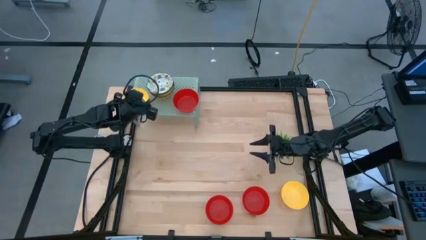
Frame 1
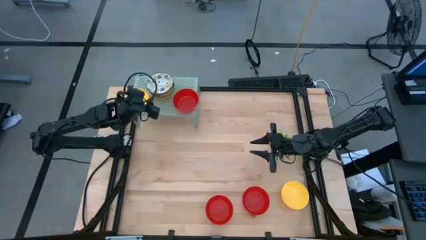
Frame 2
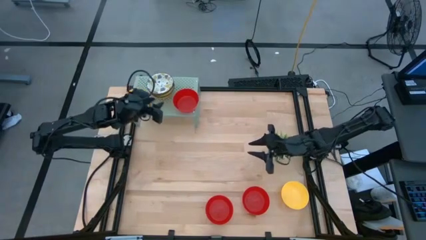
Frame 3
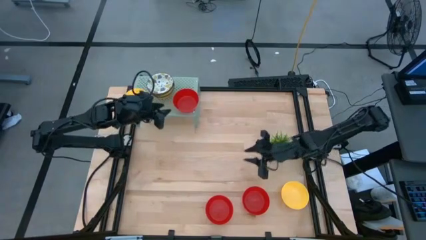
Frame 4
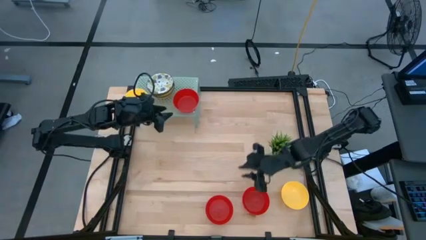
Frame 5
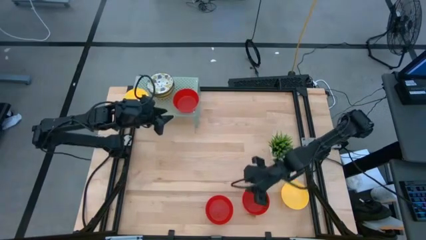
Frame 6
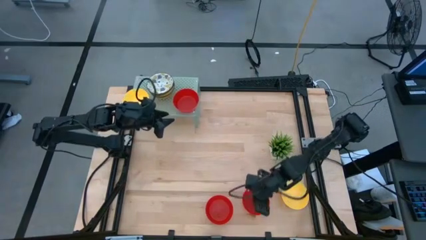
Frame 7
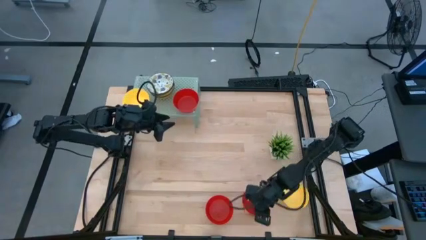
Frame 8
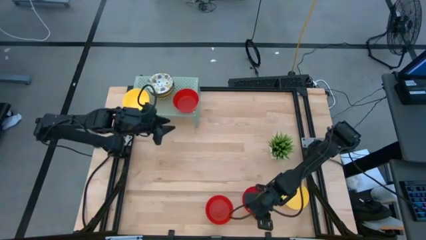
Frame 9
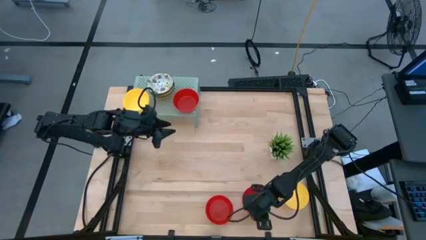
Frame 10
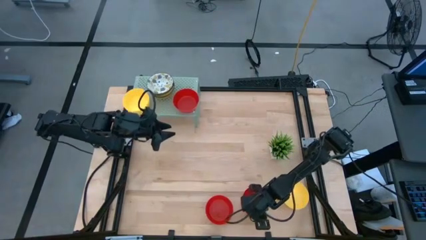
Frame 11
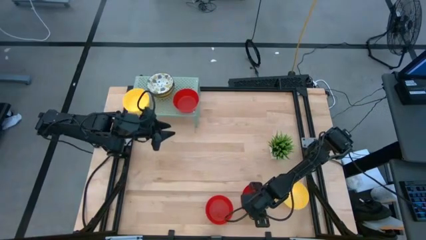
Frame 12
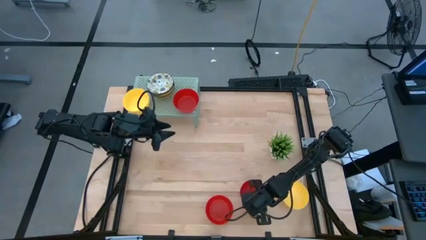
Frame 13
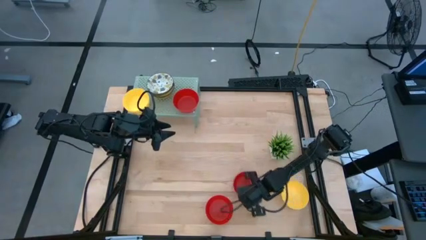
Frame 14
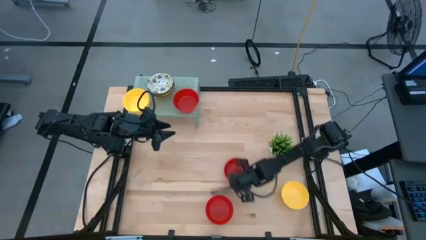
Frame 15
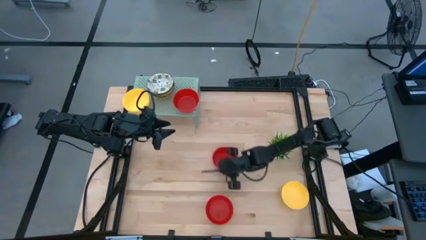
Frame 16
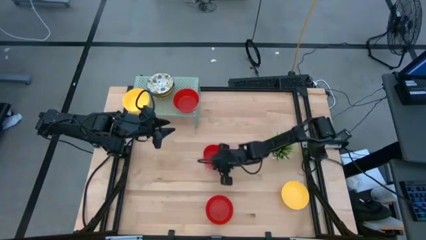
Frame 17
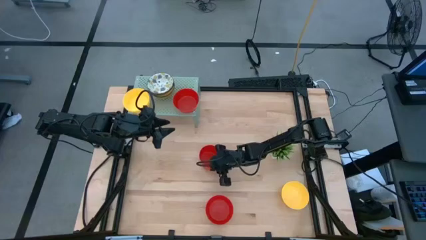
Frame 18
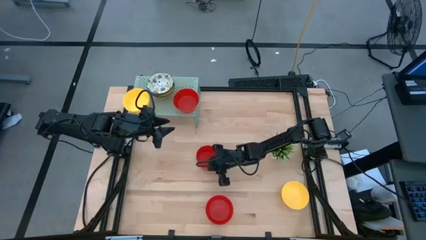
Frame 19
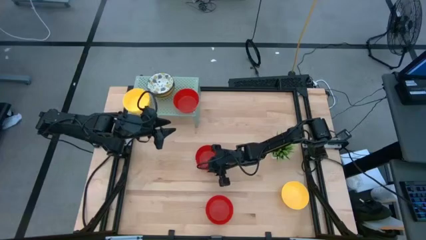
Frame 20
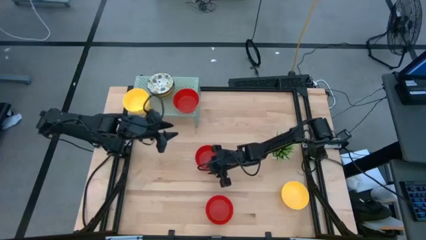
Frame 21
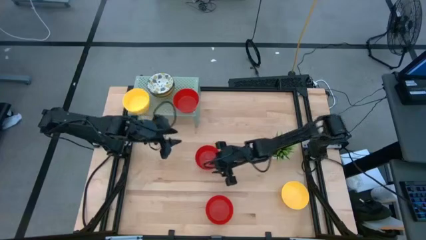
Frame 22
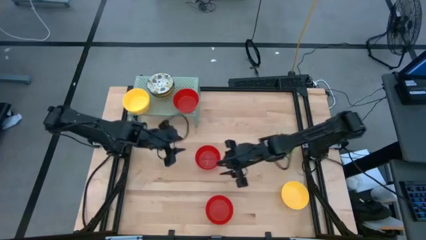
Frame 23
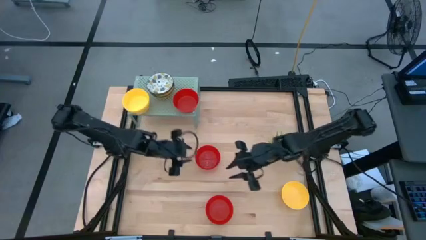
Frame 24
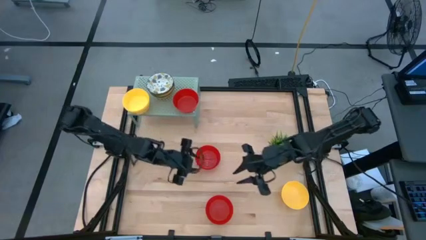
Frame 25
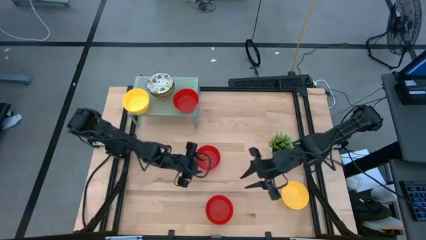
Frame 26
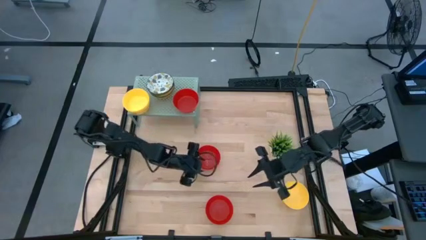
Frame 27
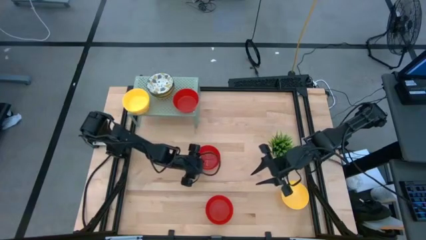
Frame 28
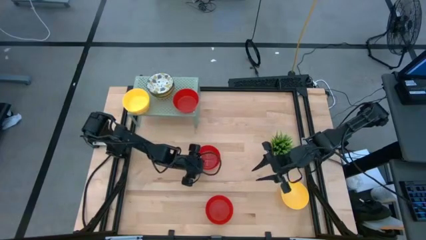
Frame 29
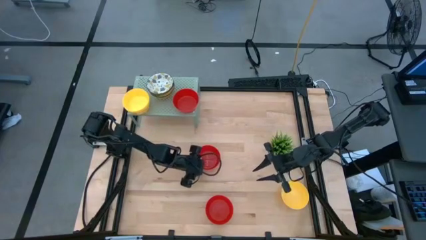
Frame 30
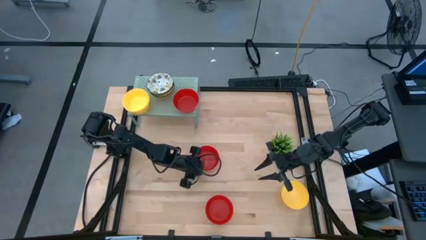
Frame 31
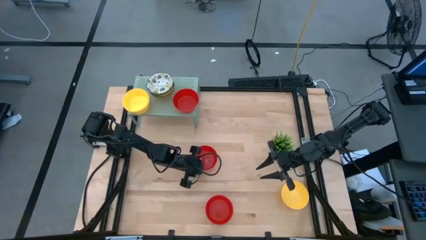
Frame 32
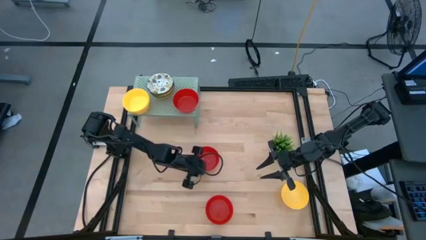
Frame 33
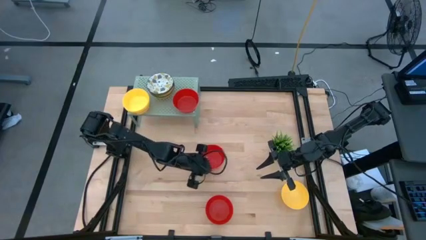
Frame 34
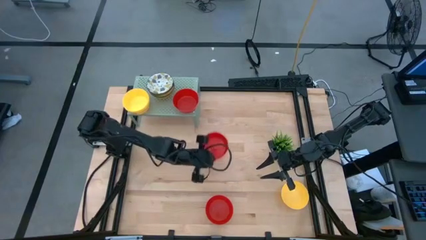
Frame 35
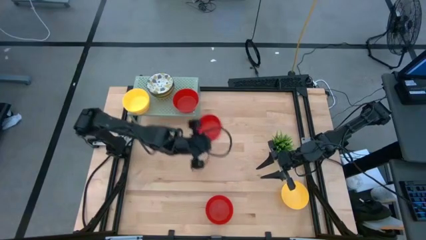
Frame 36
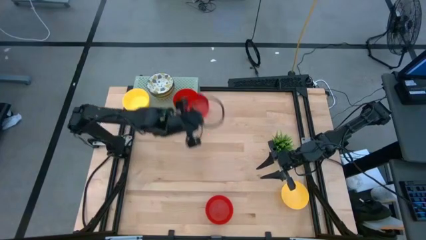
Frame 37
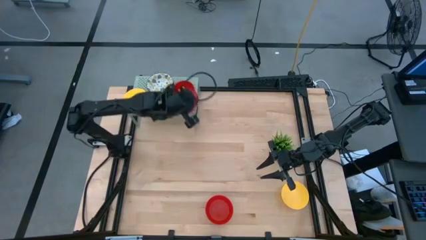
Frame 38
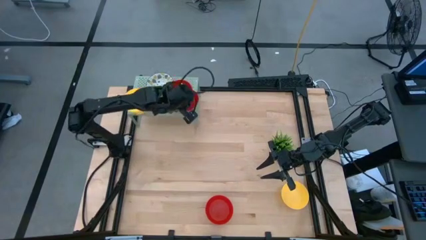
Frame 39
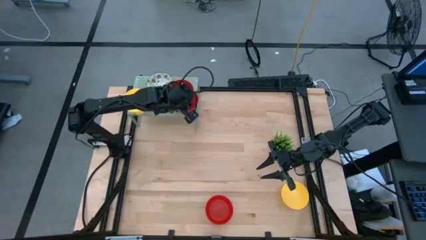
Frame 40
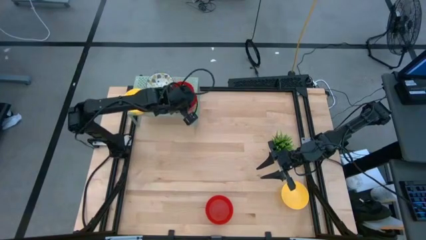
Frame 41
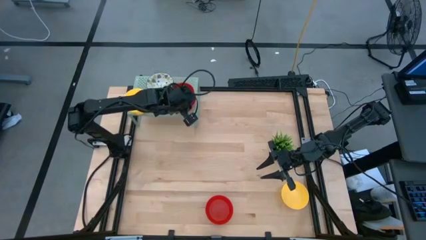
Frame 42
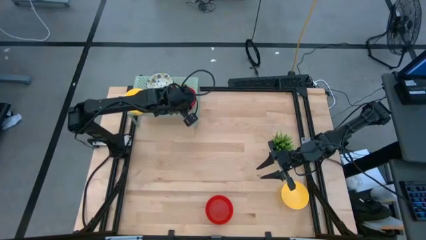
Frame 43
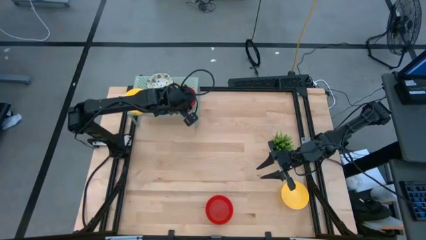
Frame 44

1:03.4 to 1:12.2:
Task: Pick & Place Mini bowls
Stack the red bowl on the red bowl on the shelf

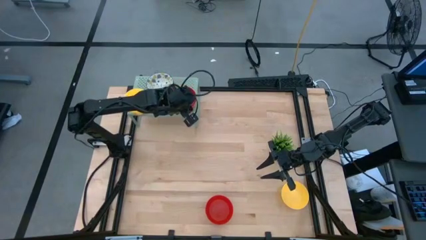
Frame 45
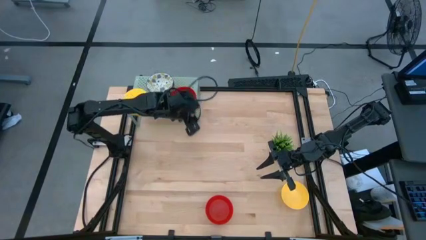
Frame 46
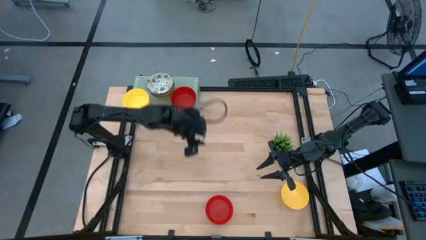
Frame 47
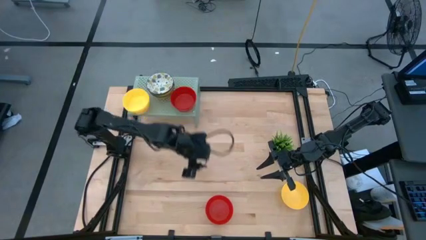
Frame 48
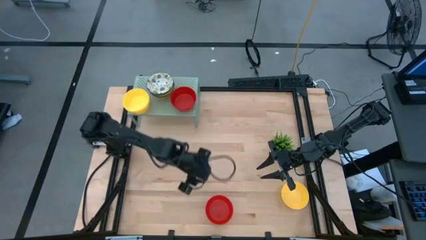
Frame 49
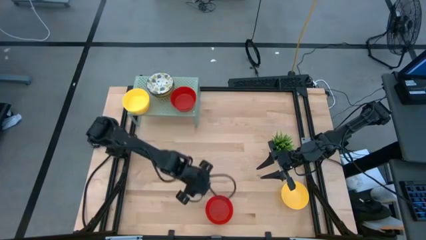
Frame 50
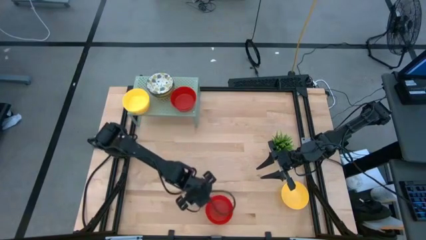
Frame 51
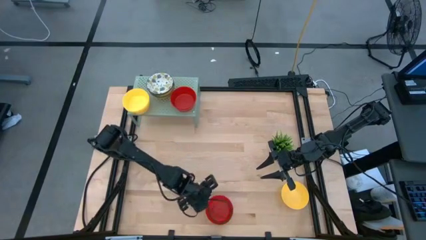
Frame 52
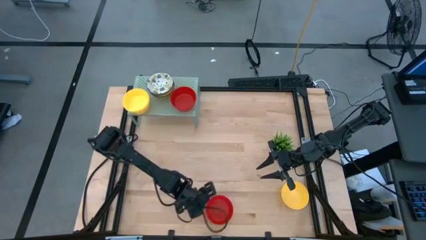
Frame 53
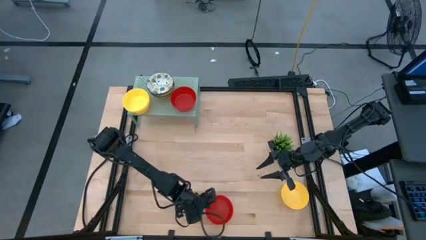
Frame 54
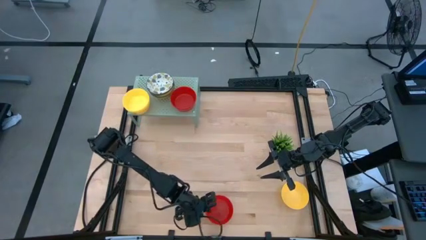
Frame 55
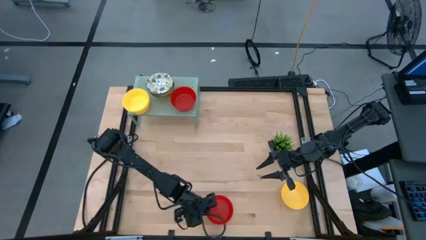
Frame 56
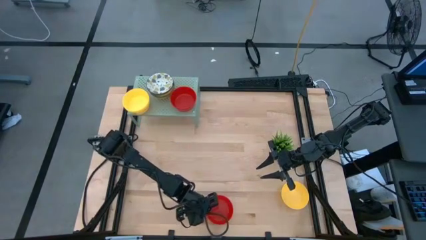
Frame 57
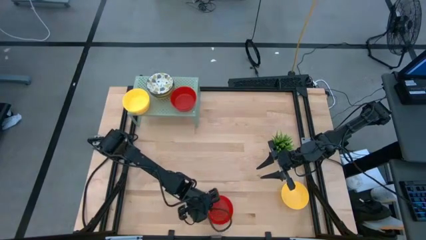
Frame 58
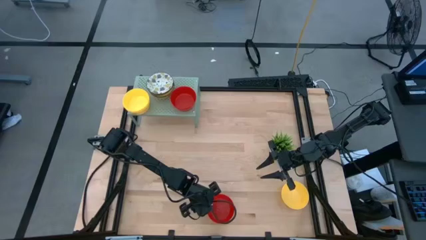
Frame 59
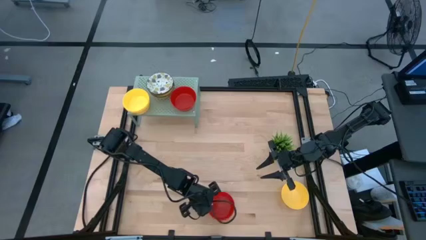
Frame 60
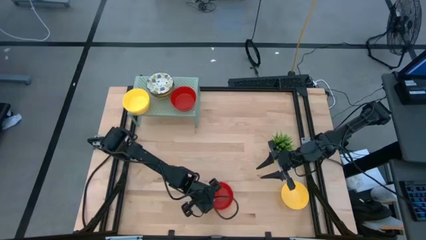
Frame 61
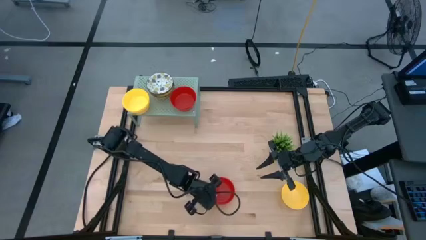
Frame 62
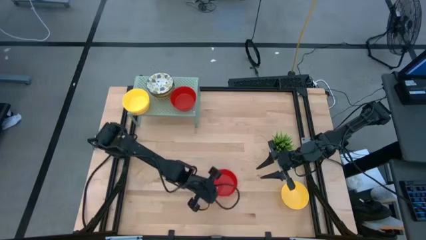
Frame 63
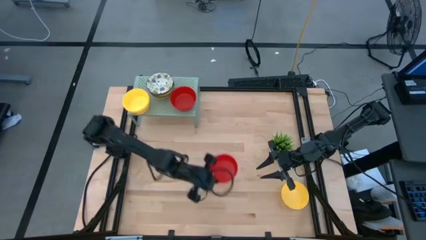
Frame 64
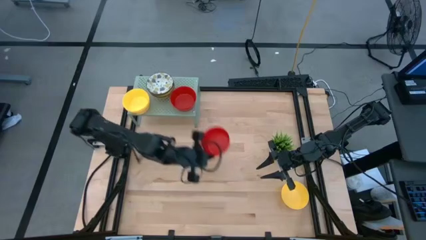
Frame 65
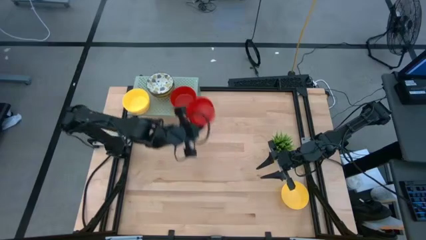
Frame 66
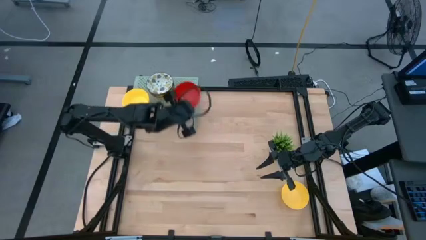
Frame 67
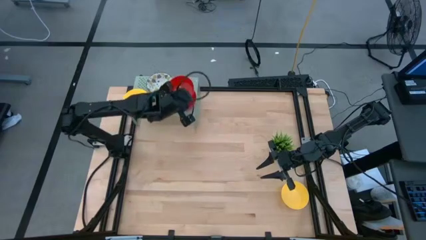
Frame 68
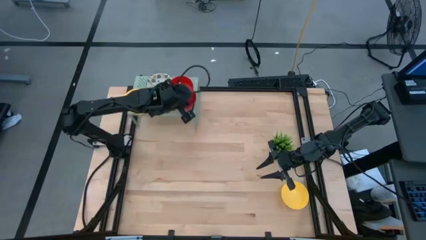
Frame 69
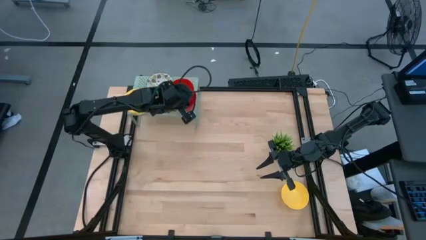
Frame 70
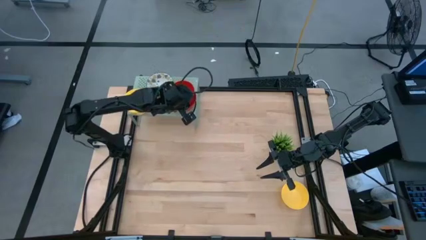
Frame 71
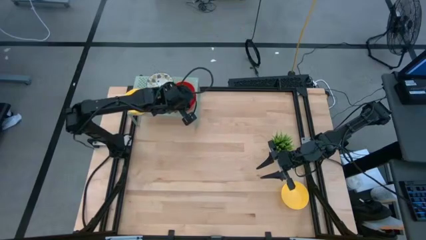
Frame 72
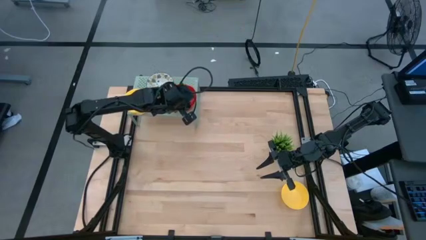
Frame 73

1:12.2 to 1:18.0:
Stack the red bowl on the red bowl on the shelf

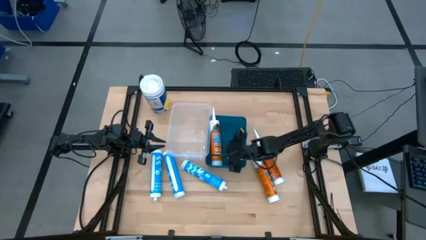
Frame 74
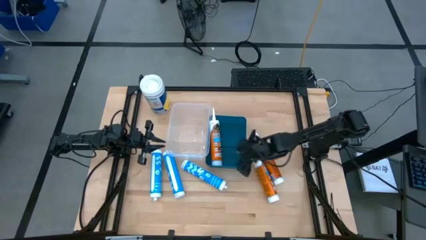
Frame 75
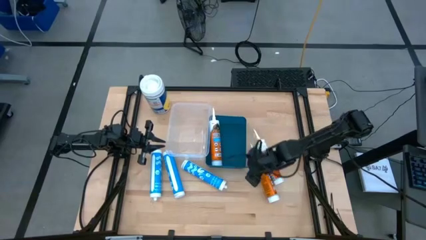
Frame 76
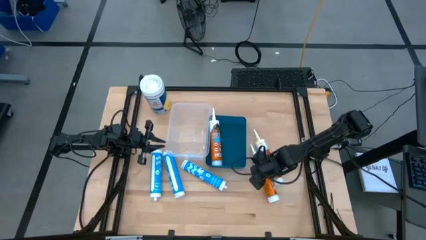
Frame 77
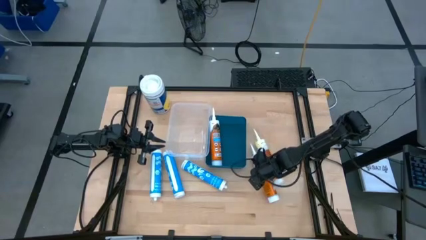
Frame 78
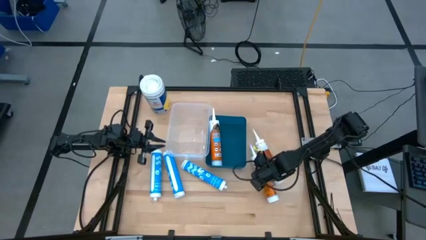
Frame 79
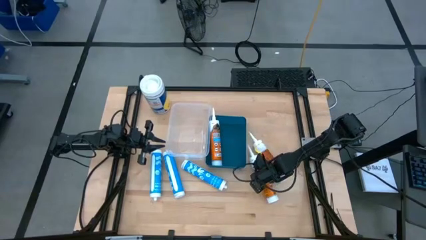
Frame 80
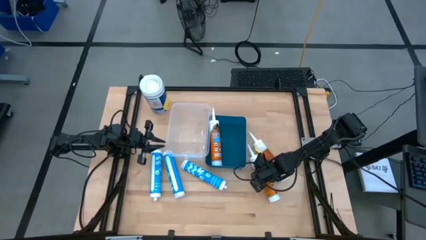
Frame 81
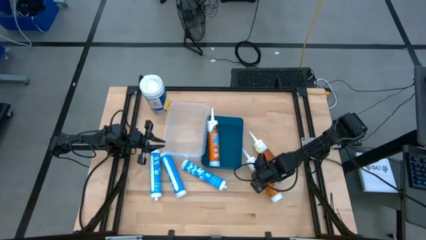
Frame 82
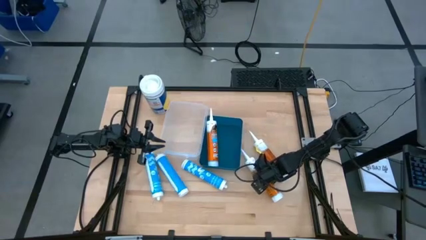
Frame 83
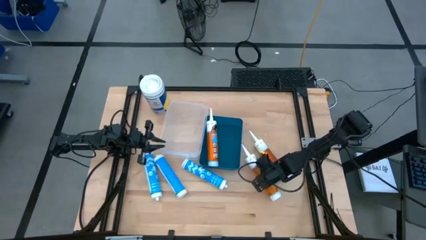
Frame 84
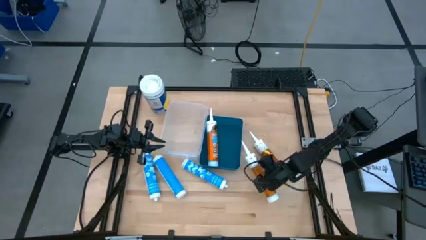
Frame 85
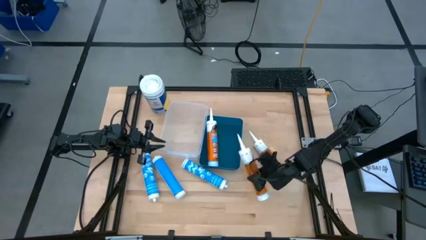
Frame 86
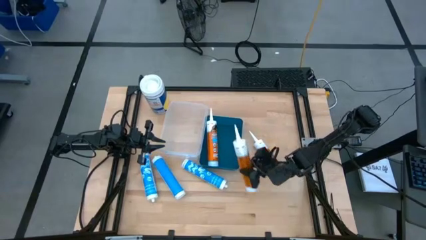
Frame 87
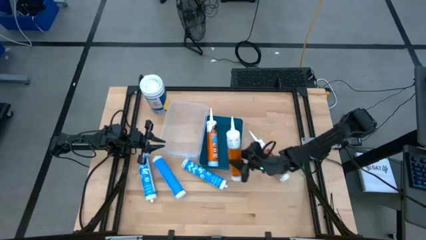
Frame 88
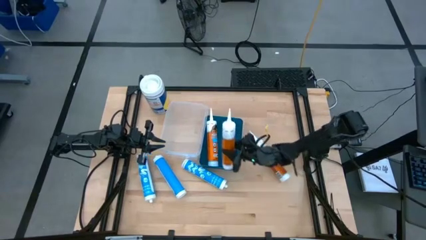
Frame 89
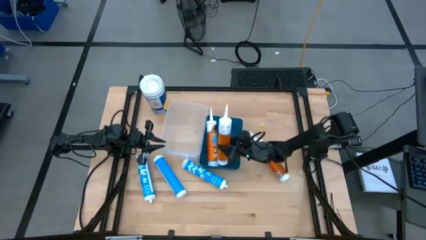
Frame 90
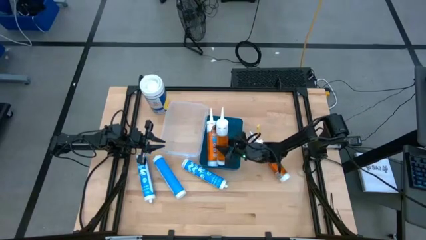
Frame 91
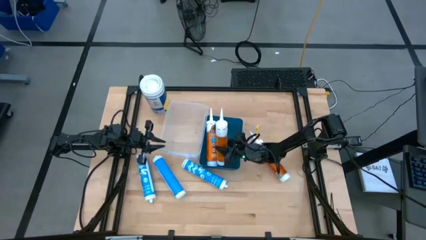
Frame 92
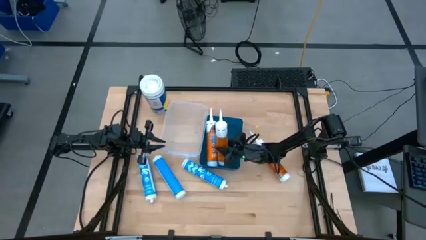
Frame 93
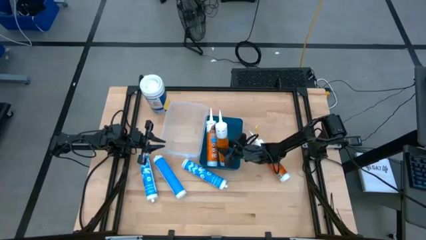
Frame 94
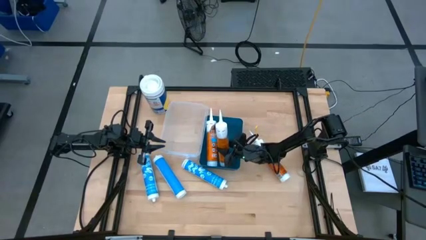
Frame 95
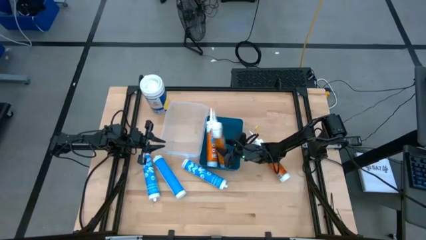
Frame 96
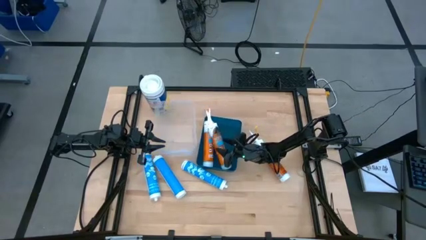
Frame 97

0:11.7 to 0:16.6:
Task: Pick & place silicon tubes, Sealant and Lysol wipes
Put the left orange sealant into the blue bin
